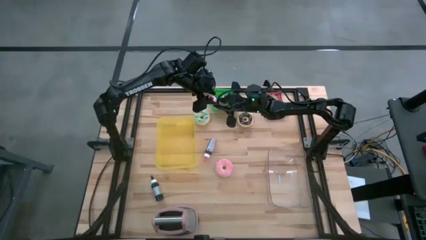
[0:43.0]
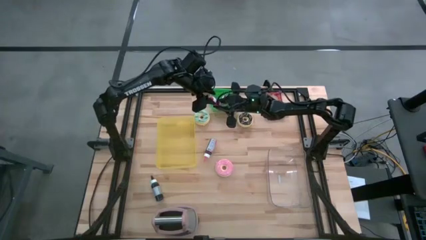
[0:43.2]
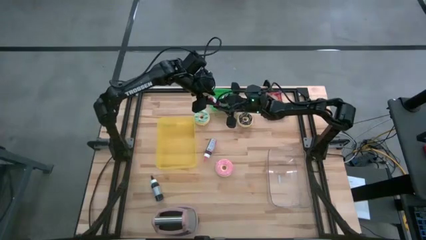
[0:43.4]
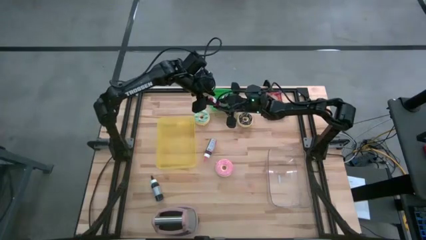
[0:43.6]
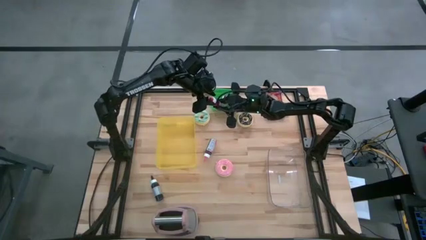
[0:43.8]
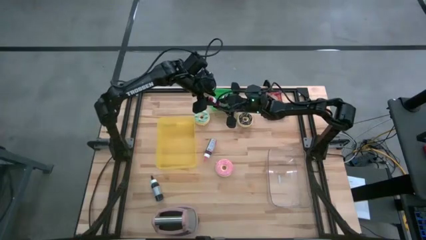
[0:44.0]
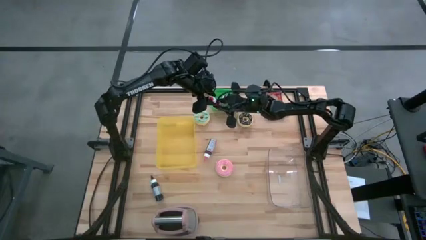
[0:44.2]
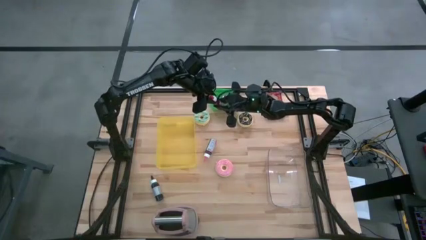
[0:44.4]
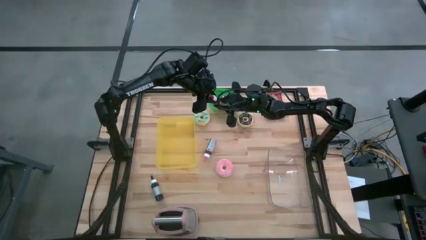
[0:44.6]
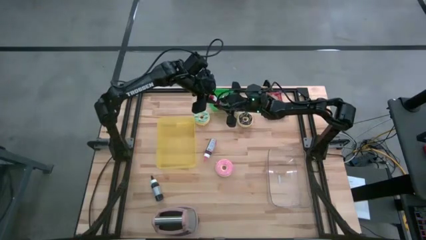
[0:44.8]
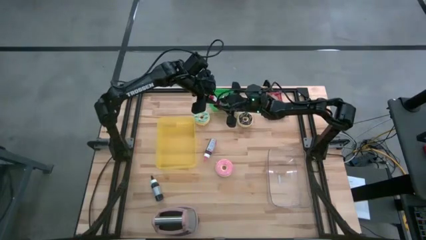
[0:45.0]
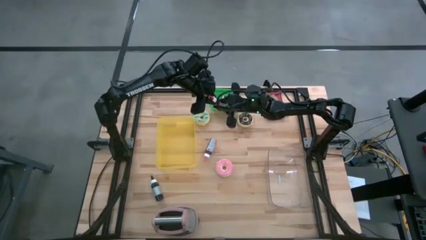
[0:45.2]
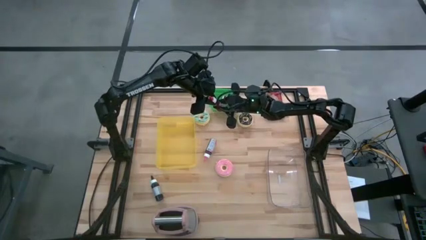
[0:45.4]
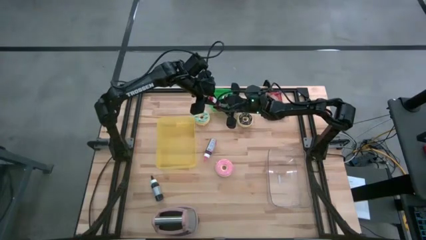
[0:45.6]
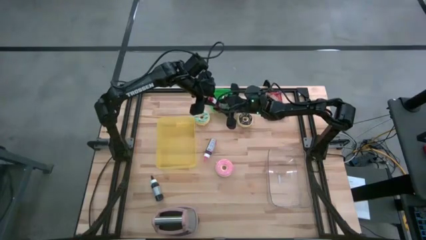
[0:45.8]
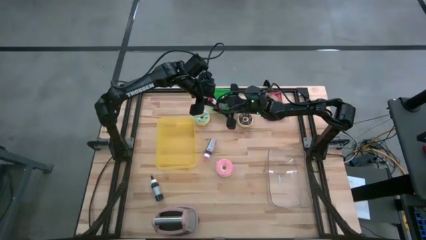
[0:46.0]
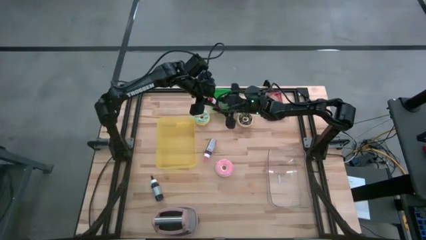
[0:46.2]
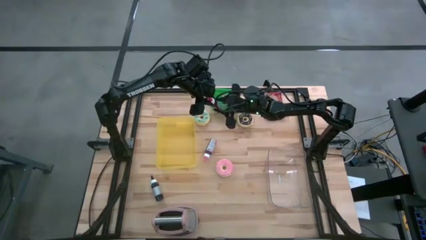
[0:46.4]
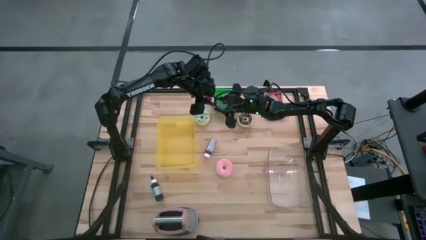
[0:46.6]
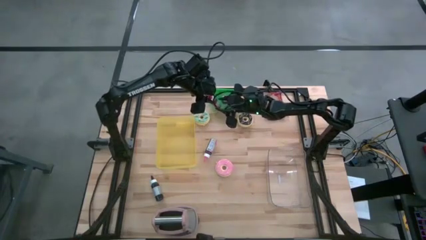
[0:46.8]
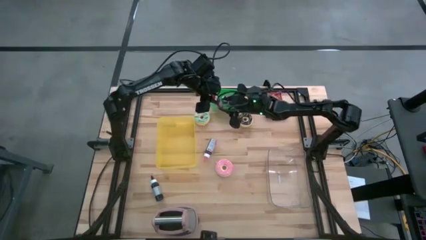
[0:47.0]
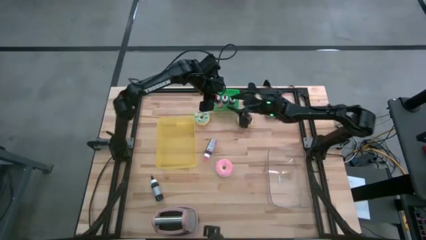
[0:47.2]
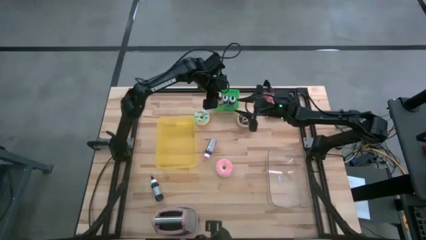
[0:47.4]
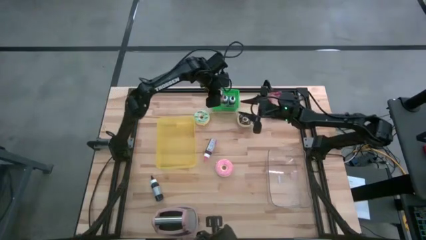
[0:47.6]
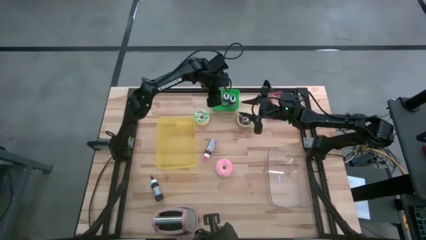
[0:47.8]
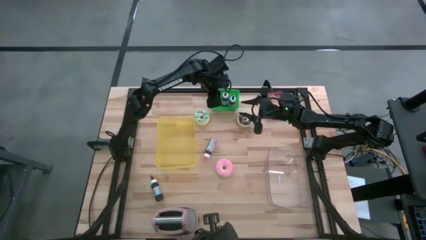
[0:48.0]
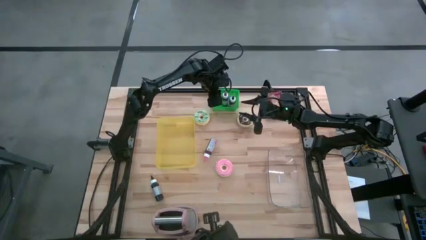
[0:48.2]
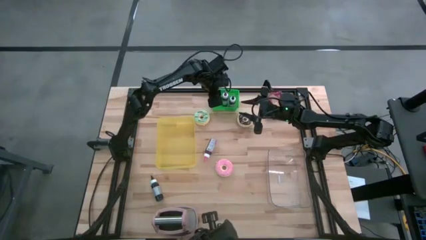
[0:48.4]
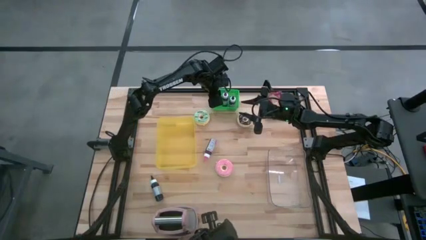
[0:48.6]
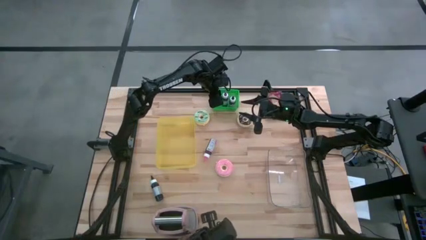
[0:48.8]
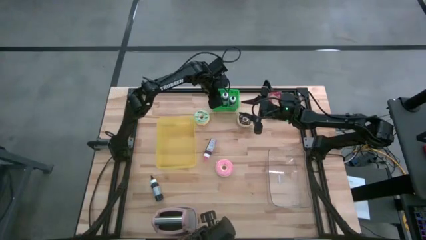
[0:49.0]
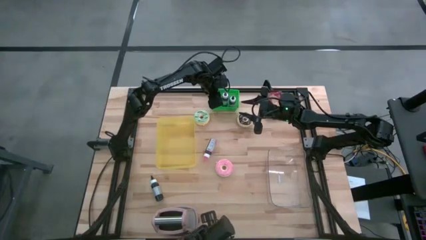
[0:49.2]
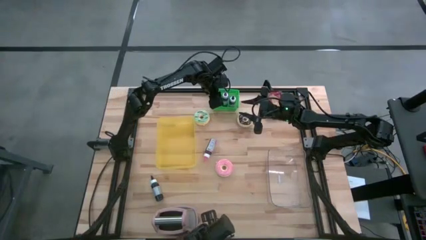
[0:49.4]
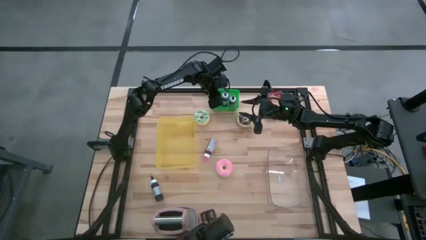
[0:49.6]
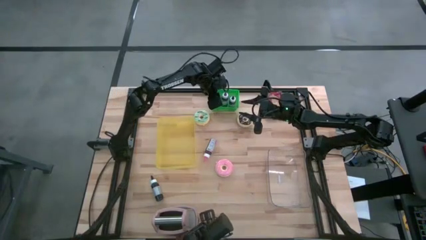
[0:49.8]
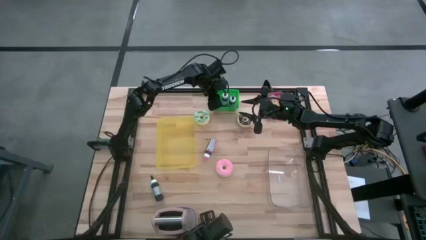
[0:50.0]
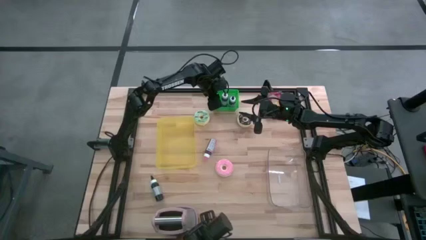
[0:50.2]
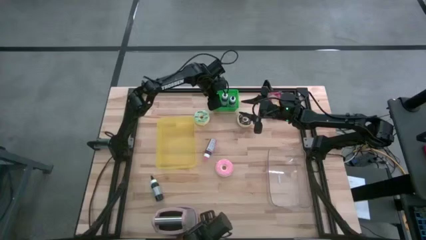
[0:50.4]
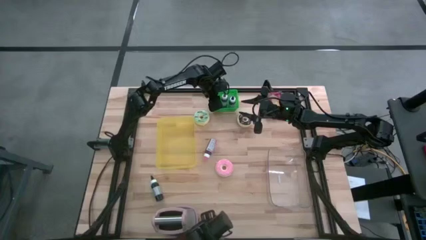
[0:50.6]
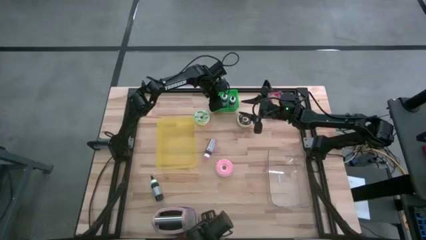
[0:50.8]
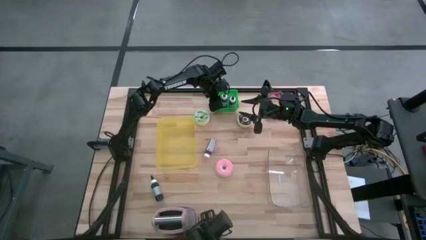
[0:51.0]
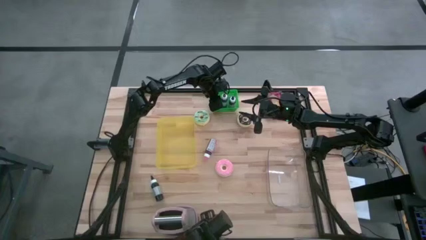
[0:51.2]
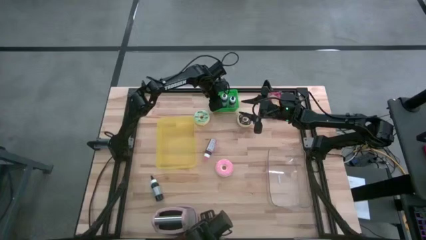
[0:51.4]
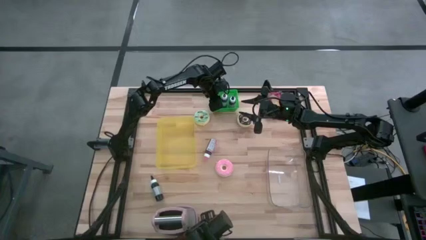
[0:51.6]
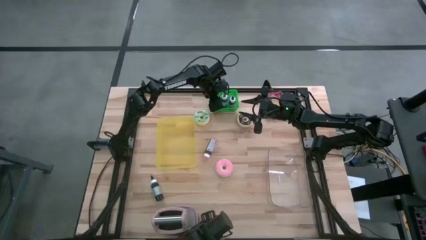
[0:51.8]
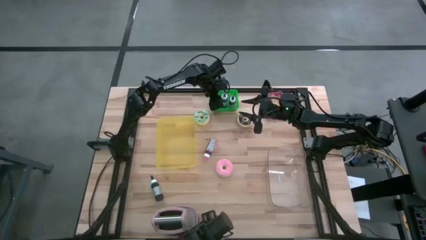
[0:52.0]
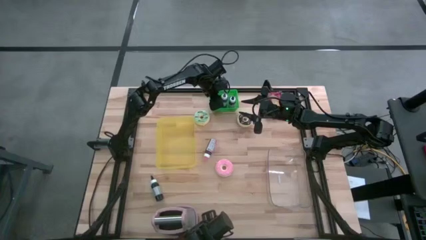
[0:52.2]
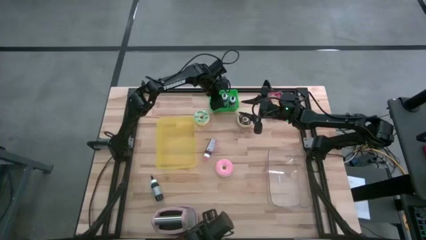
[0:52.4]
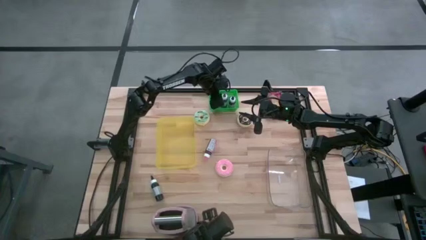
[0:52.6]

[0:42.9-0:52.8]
Task: Pick & Place Food Item
Put the red food coloring bottle into the green bin

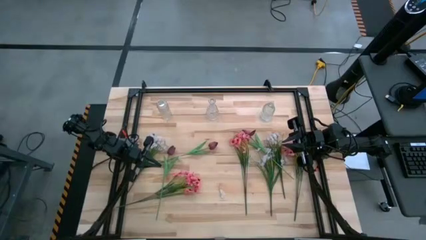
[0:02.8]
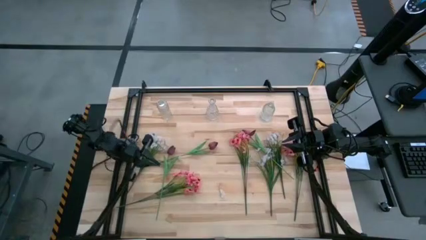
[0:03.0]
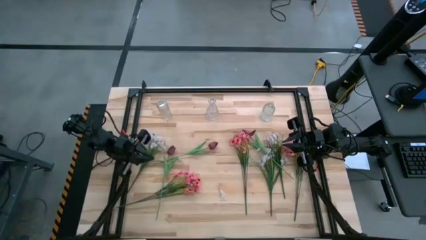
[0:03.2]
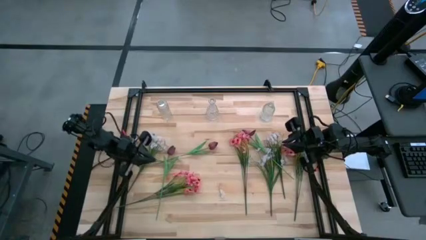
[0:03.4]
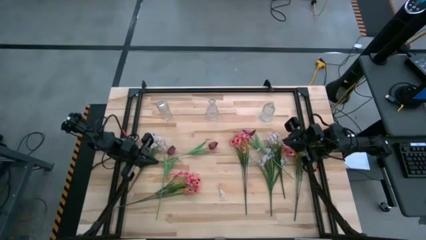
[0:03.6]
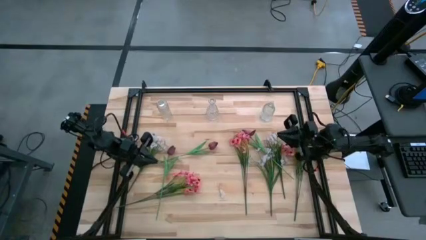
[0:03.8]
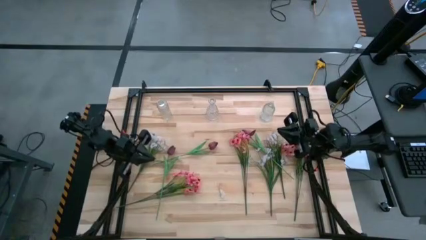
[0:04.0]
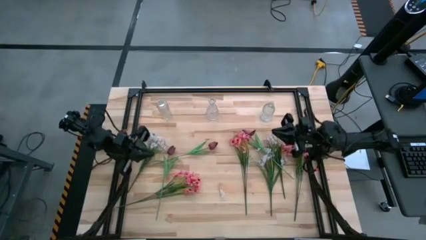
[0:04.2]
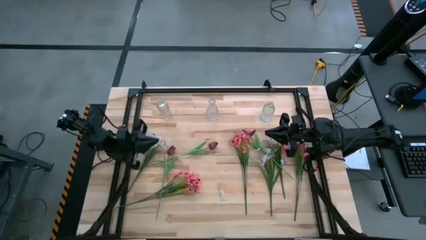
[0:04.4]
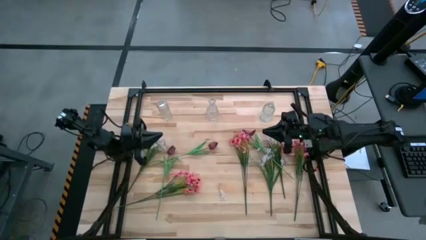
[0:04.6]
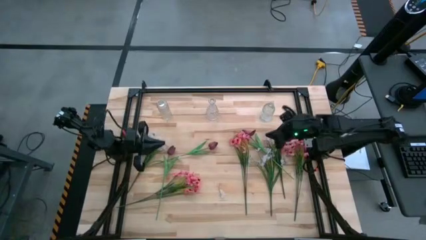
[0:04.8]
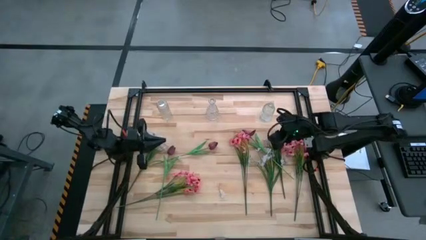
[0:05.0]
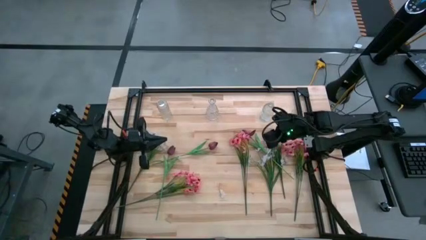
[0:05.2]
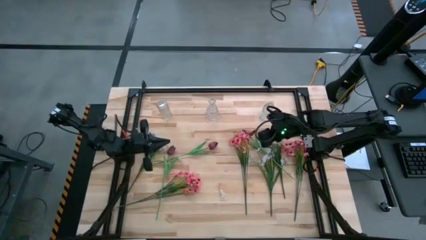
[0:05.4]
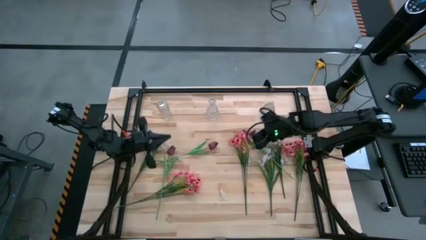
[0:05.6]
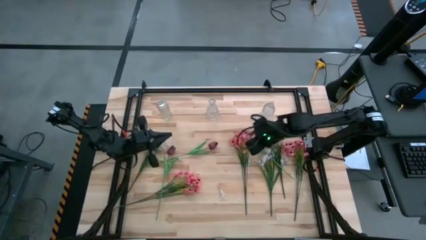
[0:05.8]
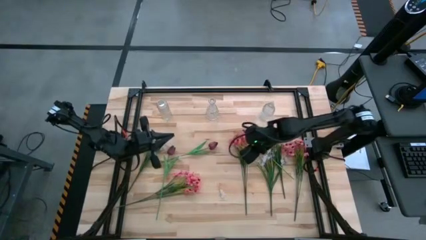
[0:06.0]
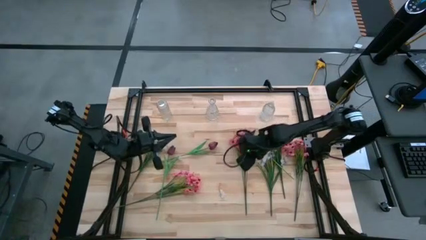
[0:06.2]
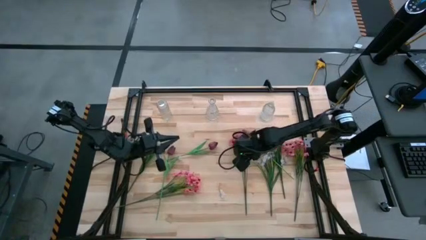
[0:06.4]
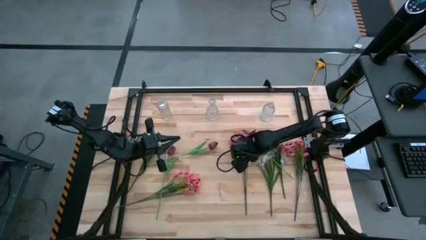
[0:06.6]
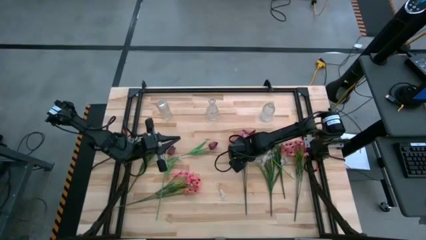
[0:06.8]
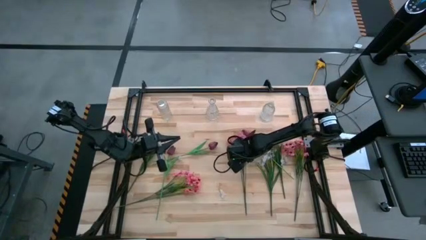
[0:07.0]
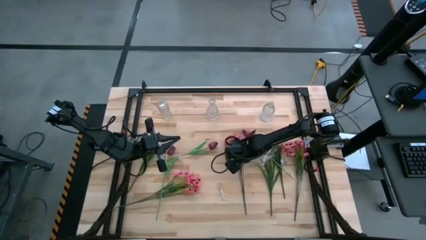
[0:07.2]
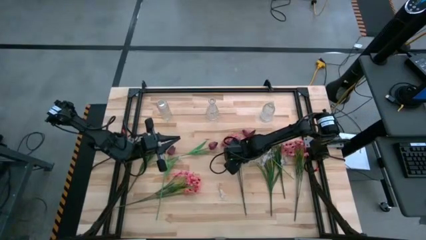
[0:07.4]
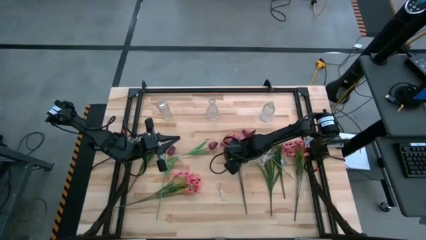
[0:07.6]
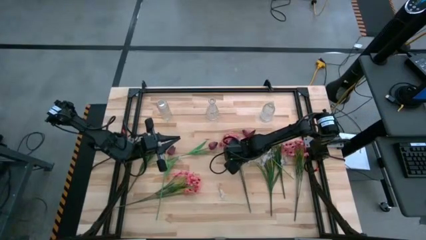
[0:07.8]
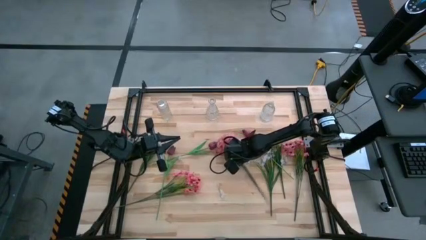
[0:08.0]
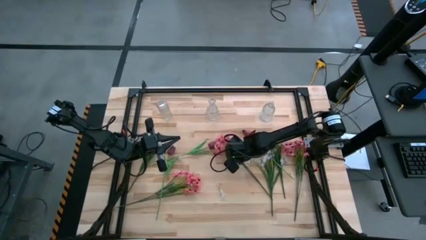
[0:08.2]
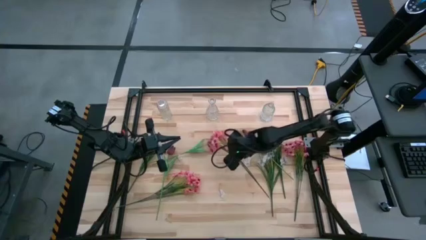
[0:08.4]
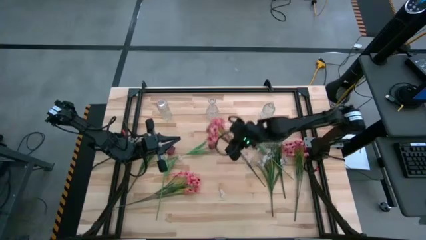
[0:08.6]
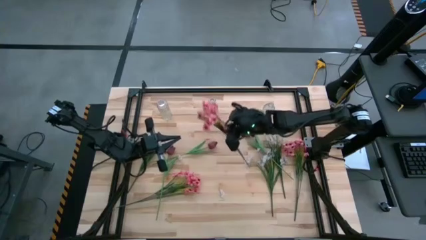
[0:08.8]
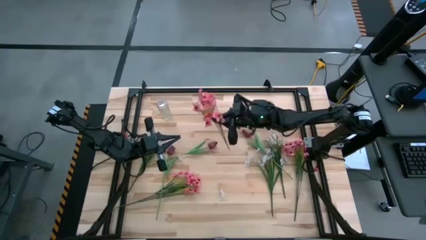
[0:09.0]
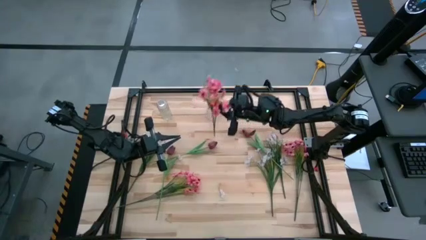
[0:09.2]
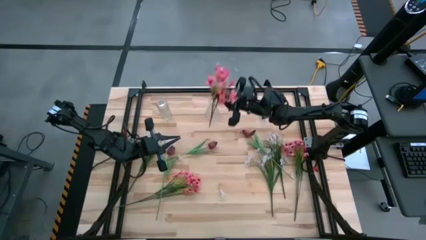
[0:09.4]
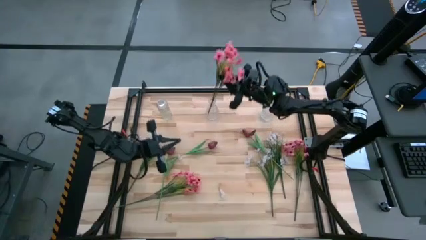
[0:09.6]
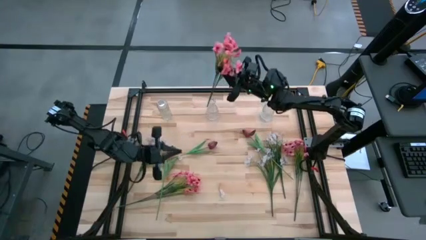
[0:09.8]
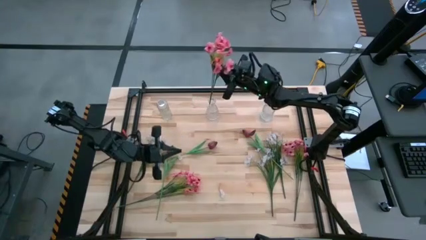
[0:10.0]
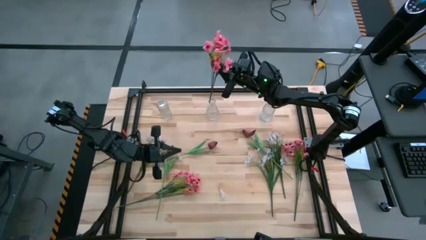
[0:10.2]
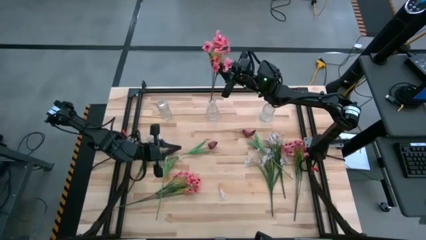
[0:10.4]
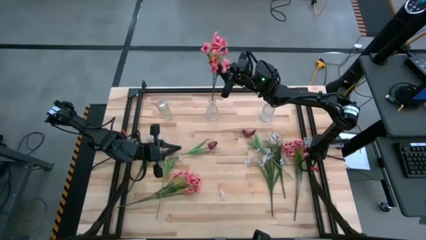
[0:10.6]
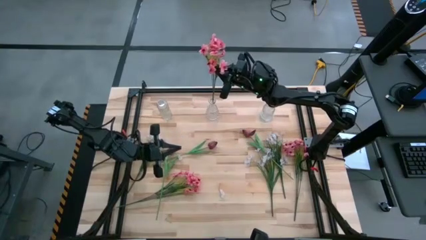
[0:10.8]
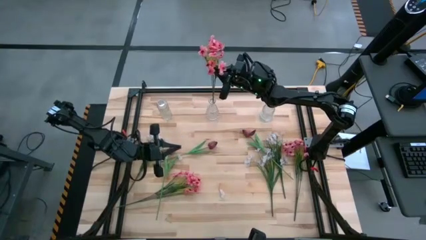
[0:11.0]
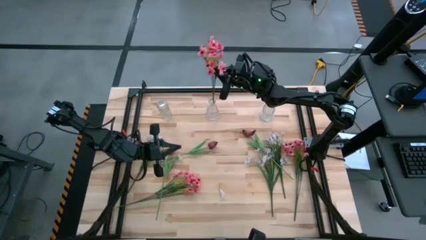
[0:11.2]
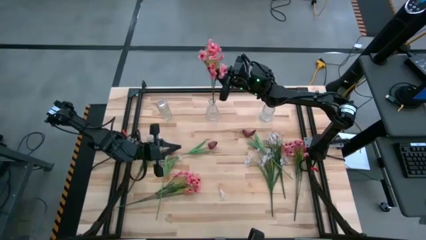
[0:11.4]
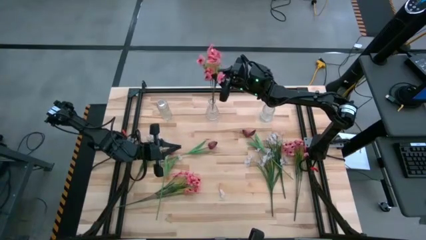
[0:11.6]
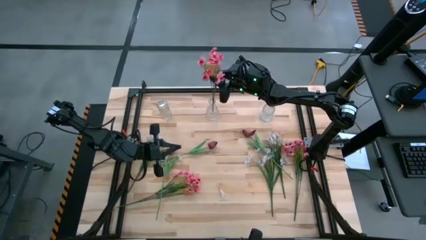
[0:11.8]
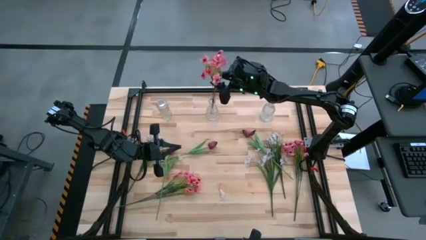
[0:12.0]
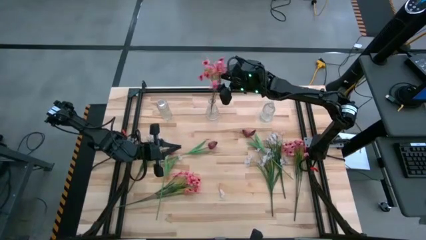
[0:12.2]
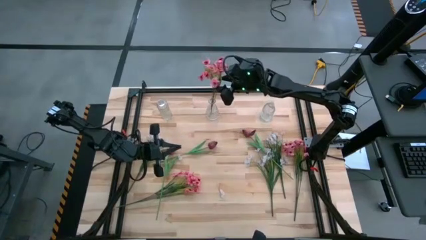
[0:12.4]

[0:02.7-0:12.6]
Task: Sort flowers into vase by color
Put the middle pink flowers into the middle transparent vase
